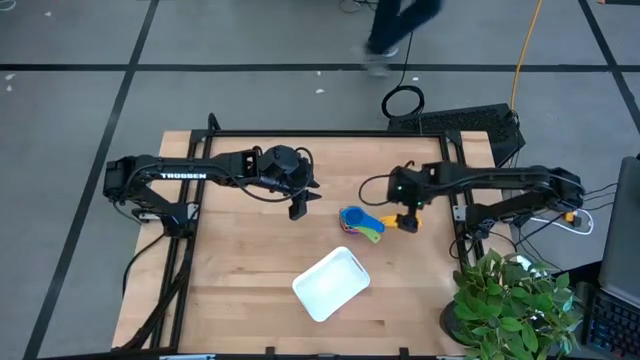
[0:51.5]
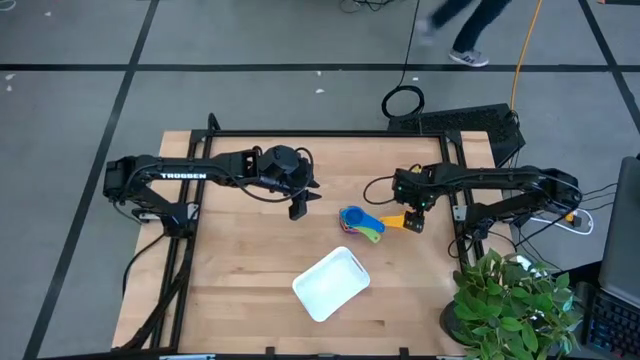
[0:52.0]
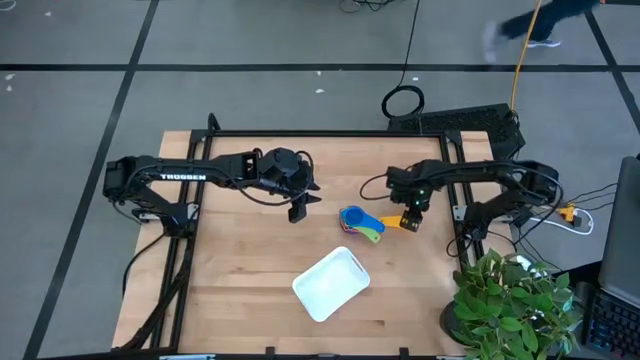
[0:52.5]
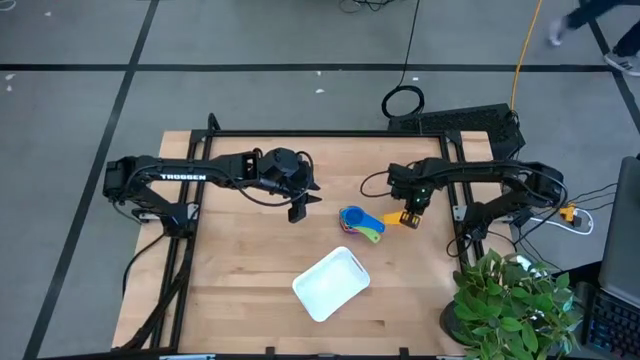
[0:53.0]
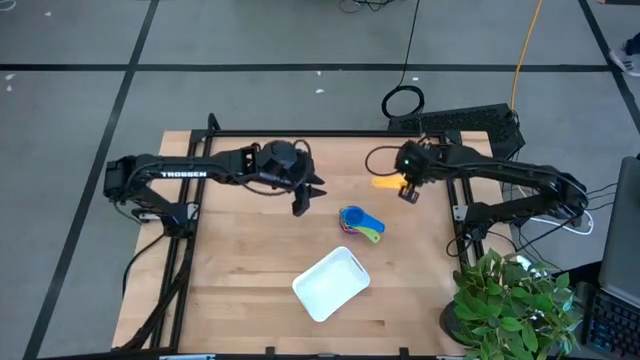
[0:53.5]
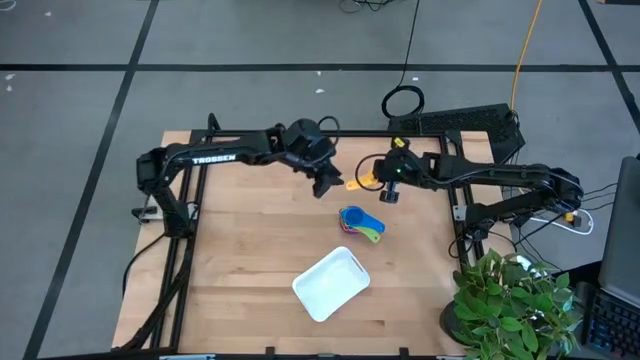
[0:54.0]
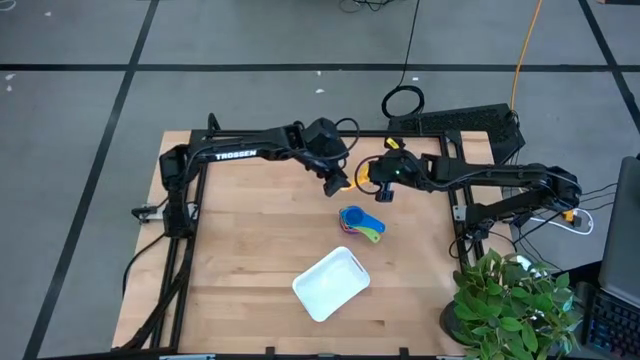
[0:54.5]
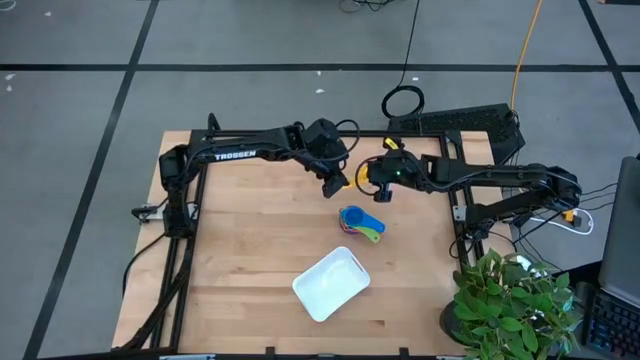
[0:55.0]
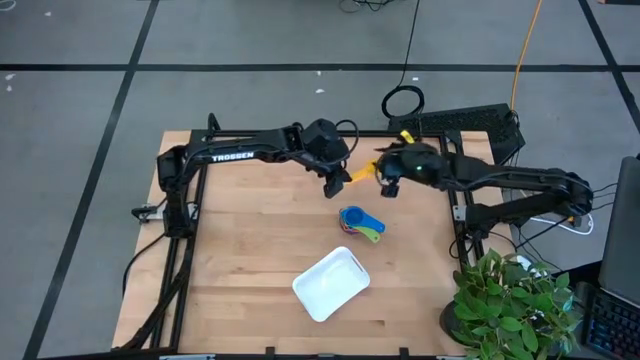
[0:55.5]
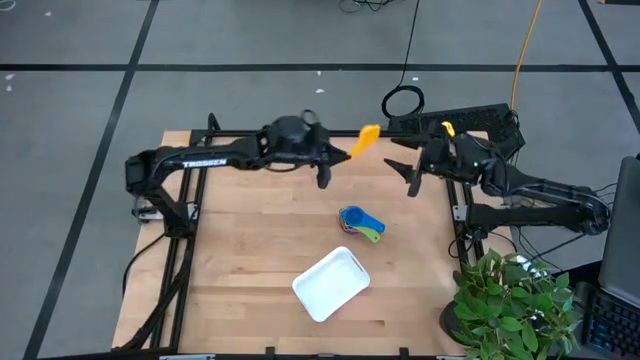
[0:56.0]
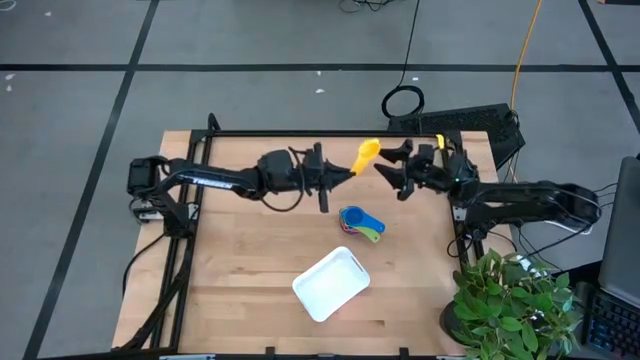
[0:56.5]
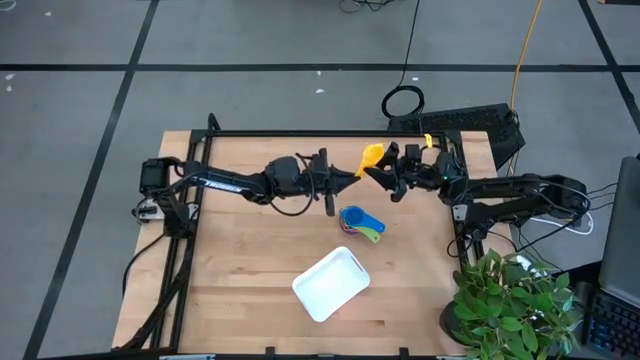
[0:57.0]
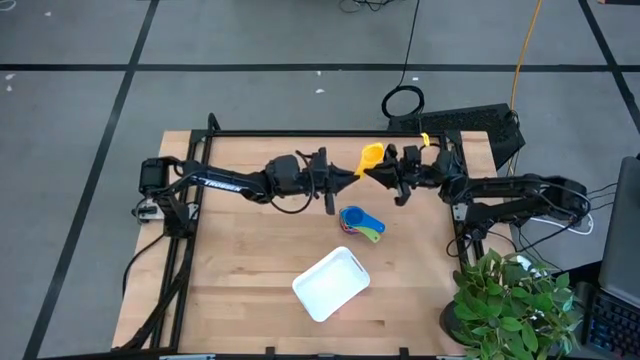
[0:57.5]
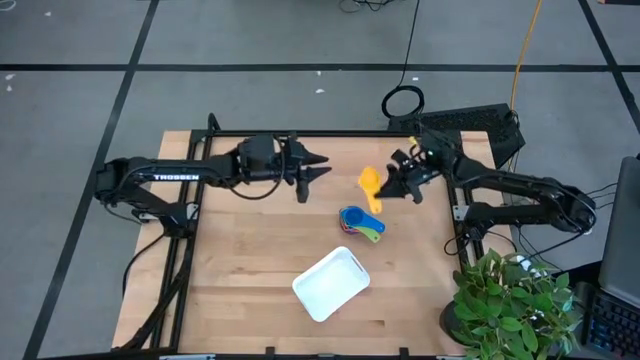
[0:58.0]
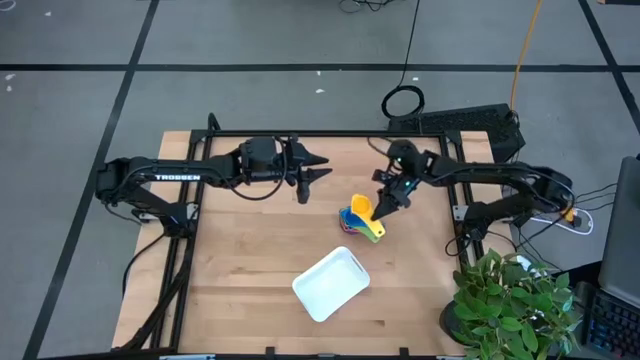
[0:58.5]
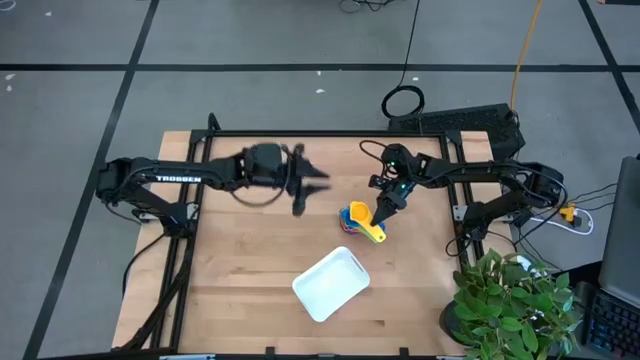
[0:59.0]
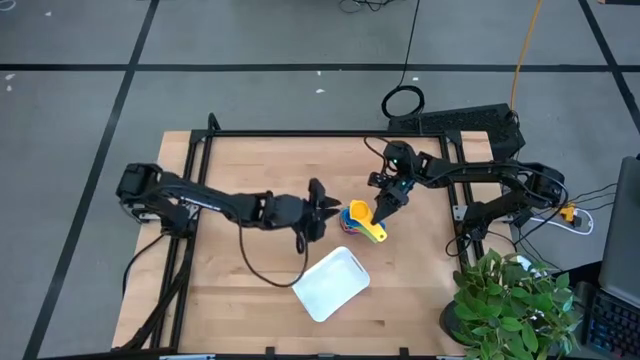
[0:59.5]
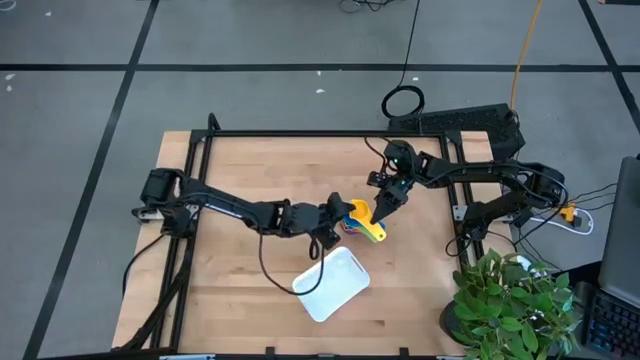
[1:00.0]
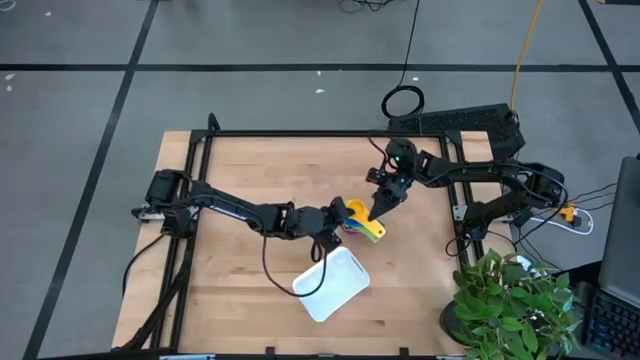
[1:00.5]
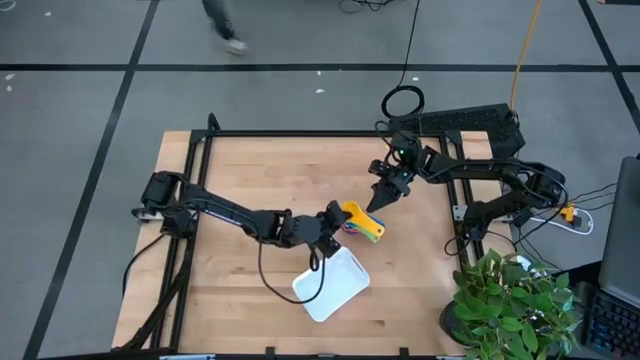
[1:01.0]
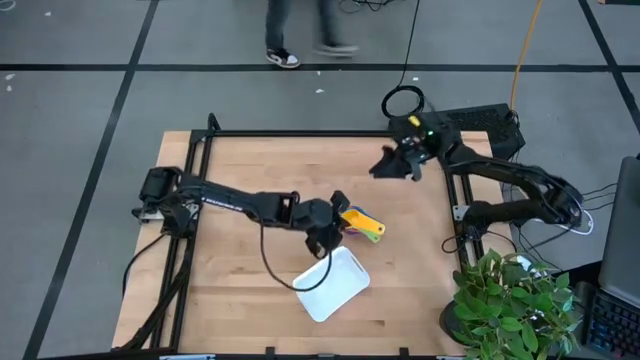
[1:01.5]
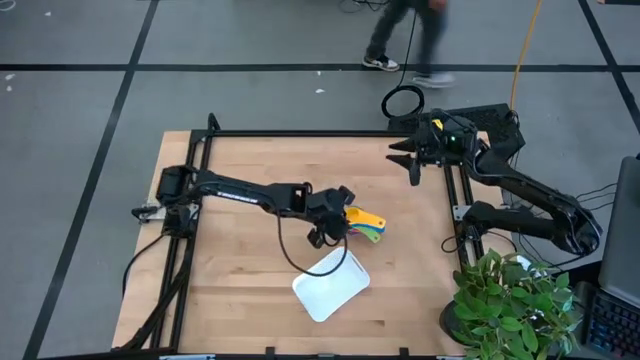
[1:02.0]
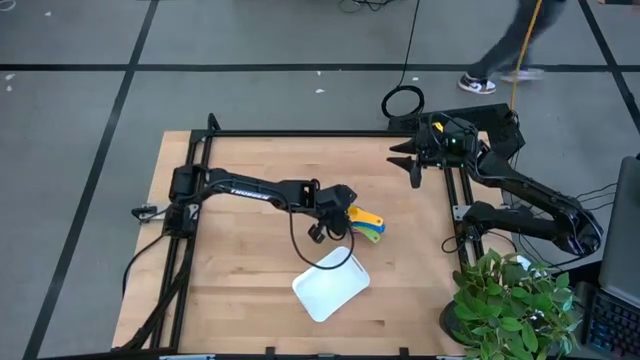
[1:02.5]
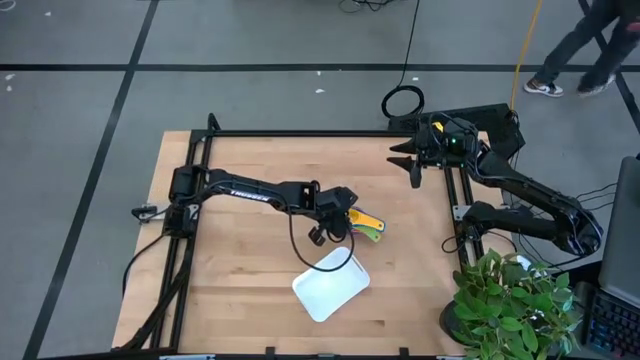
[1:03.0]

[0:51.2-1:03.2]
Task: Nest measuring cups in basket
Stack the yellow measuring cup on top of the blue measuring cup

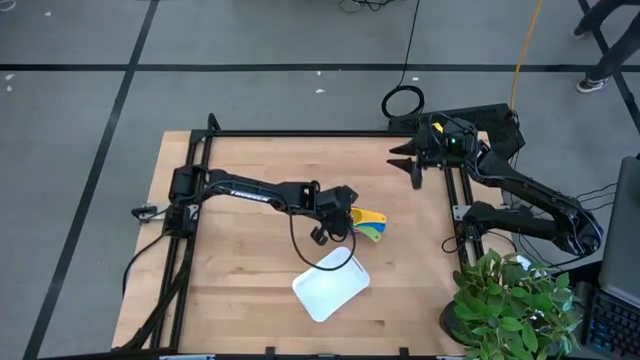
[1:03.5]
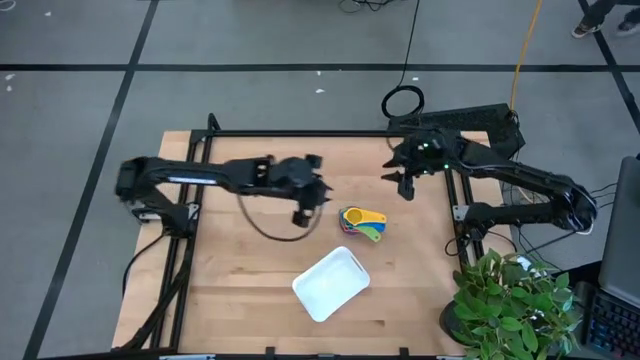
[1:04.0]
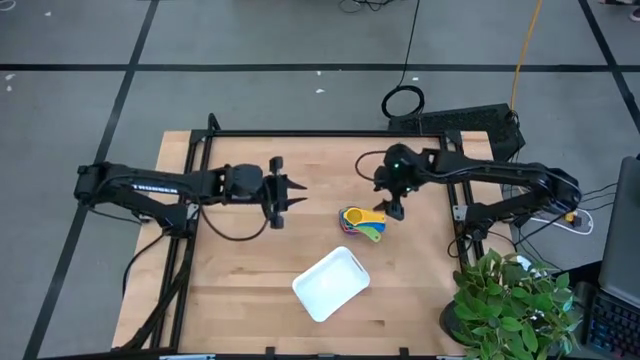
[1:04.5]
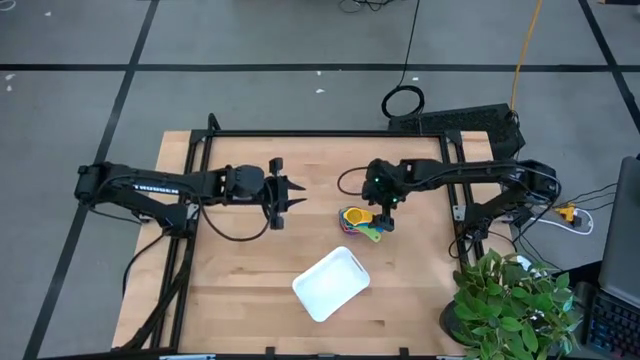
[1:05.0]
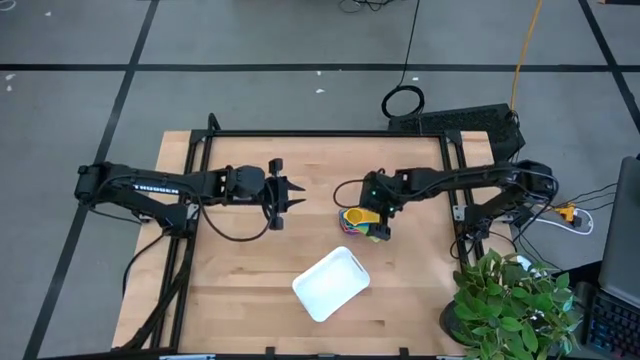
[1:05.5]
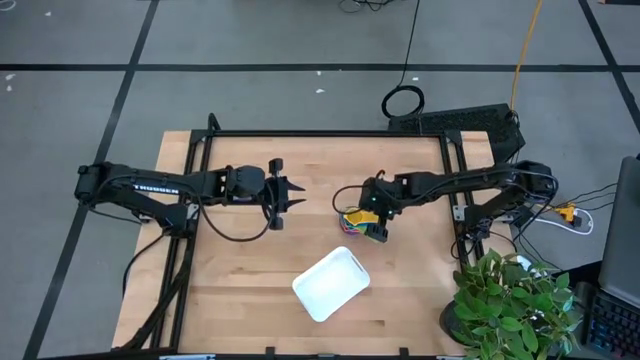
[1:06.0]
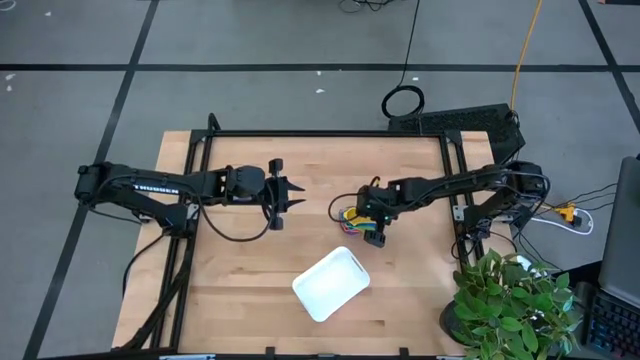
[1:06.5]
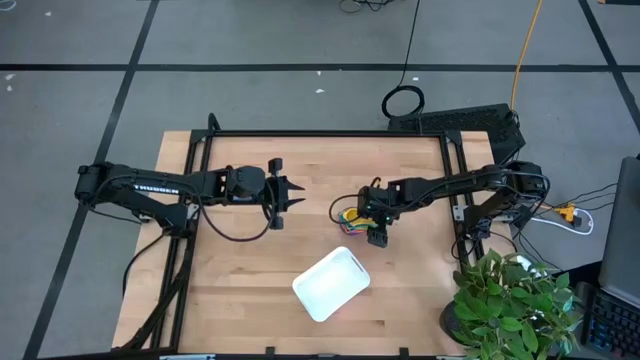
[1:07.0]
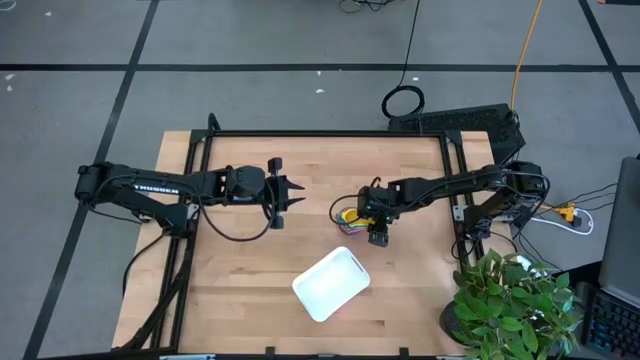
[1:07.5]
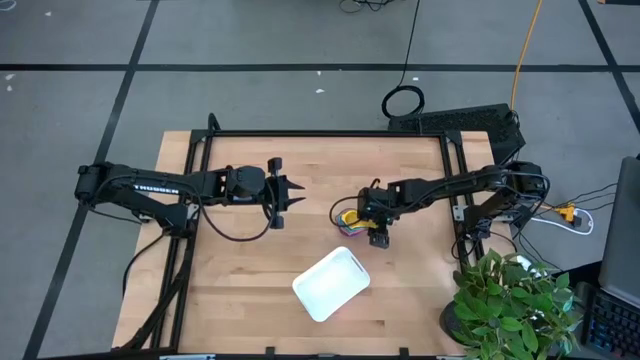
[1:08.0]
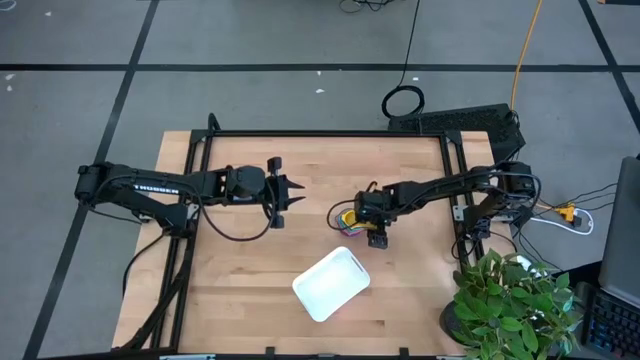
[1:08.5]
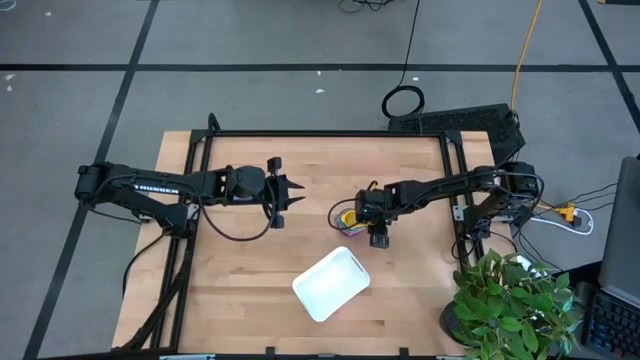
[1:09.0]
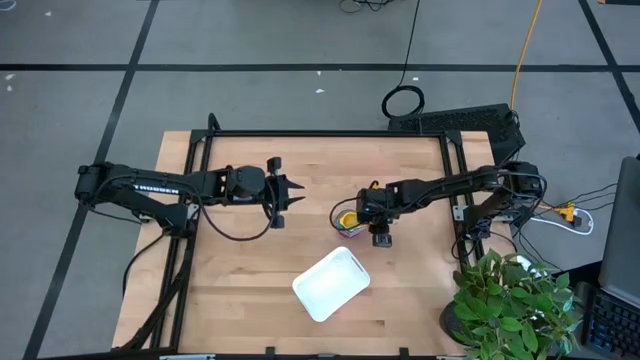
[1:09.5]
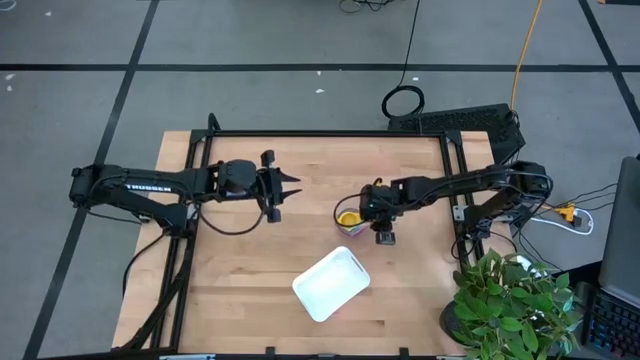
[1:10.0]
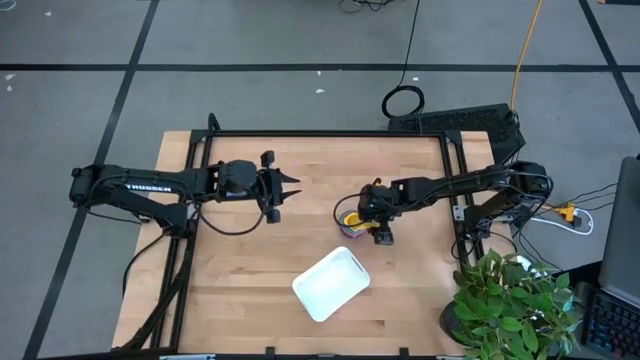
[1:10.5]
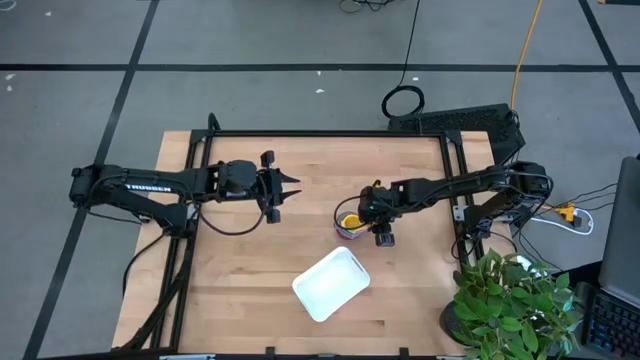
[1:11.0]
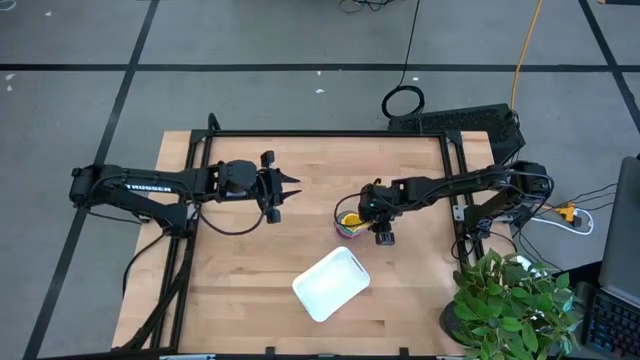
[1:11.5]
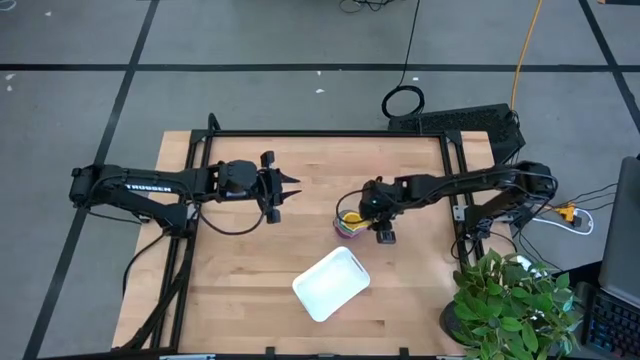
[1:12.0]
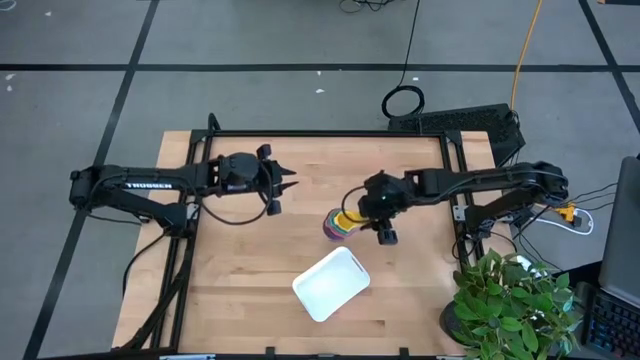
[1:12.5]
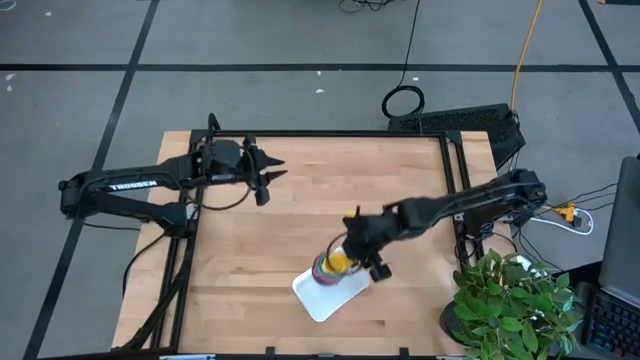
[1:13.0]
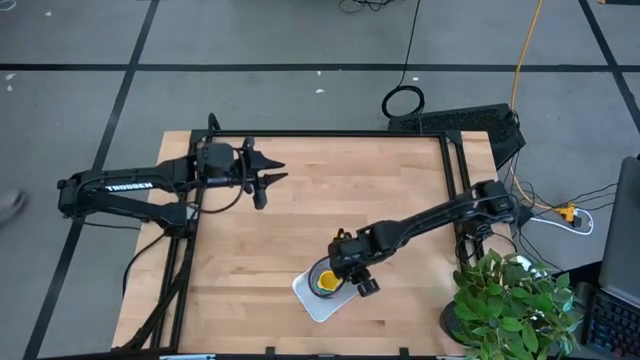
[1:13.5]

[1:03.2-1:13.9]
Put the stacked measuring cups into the white bin
